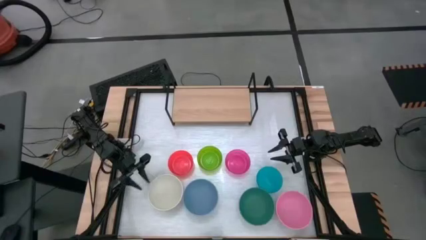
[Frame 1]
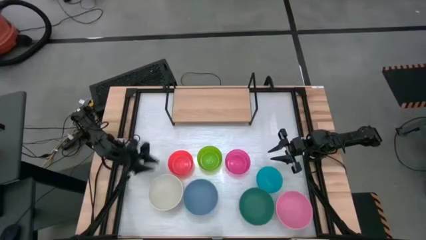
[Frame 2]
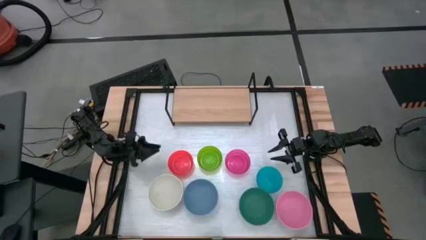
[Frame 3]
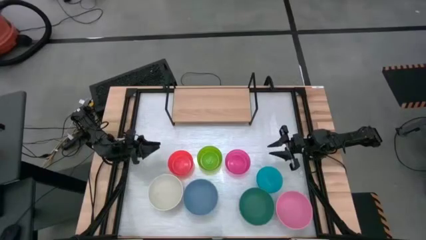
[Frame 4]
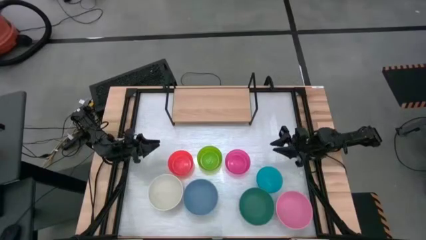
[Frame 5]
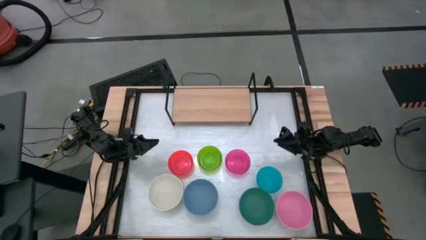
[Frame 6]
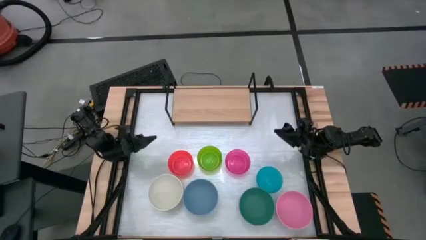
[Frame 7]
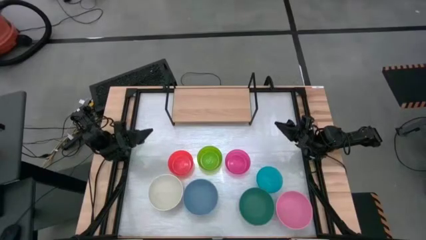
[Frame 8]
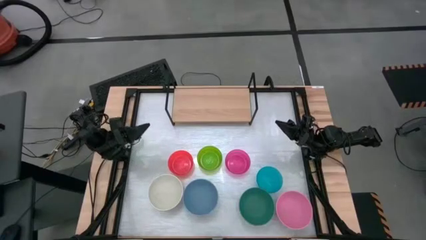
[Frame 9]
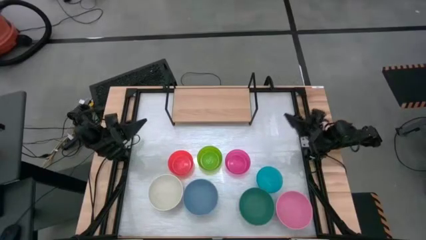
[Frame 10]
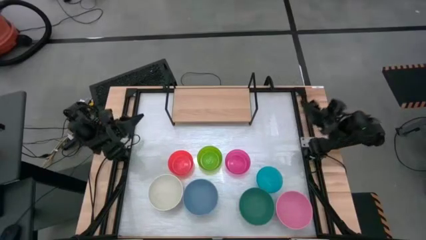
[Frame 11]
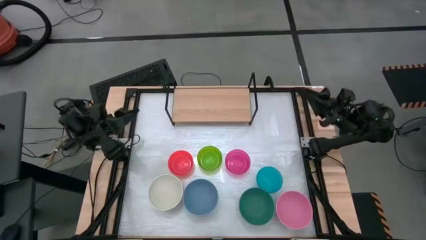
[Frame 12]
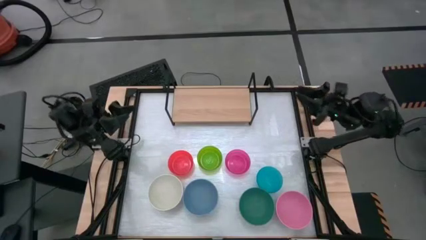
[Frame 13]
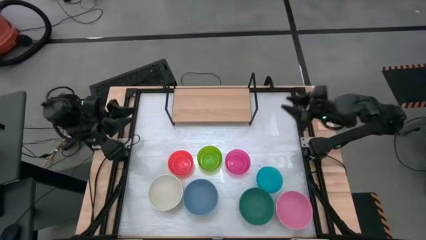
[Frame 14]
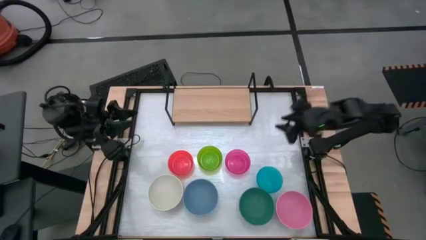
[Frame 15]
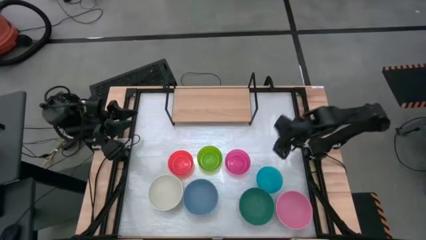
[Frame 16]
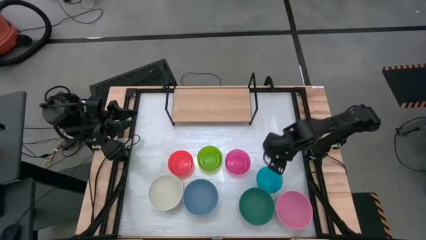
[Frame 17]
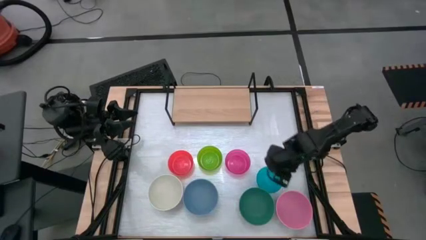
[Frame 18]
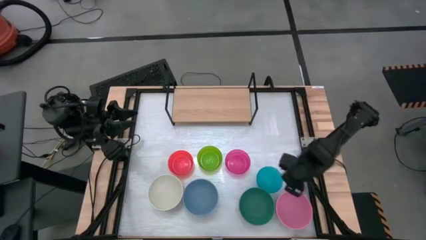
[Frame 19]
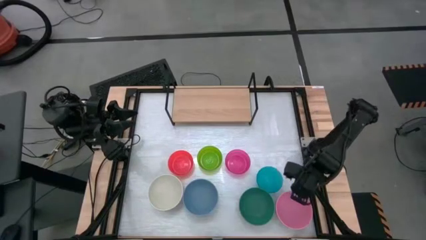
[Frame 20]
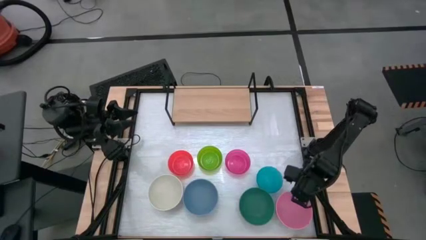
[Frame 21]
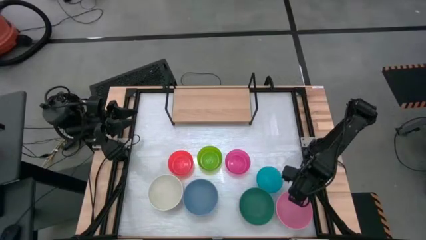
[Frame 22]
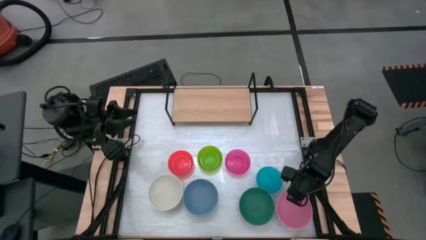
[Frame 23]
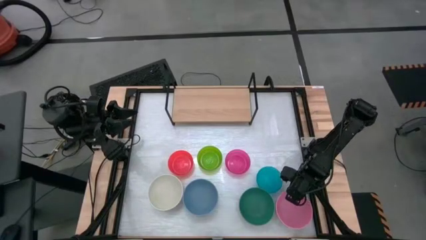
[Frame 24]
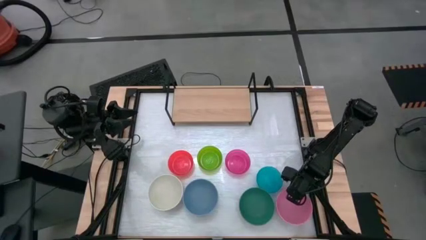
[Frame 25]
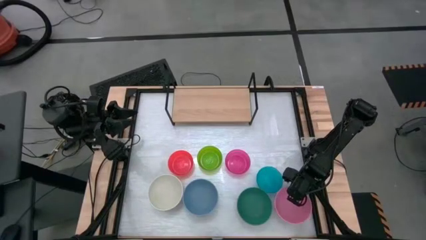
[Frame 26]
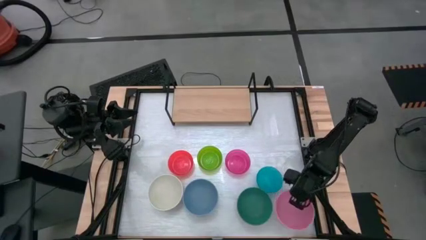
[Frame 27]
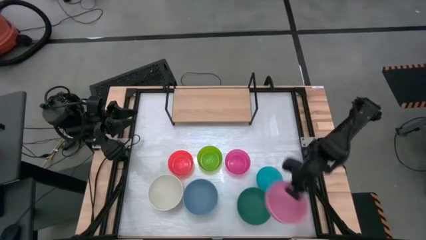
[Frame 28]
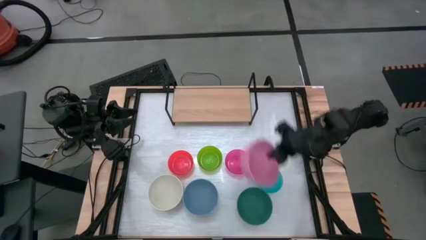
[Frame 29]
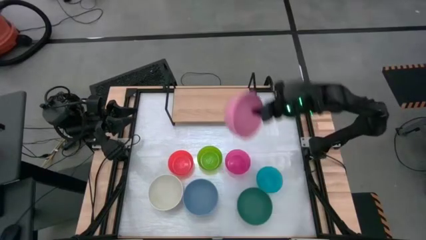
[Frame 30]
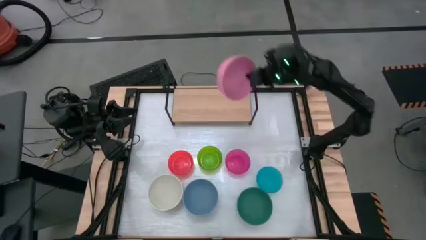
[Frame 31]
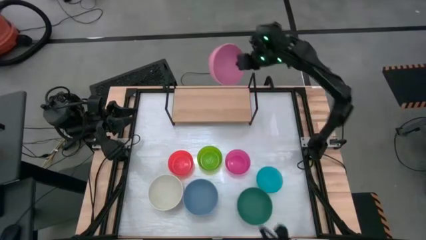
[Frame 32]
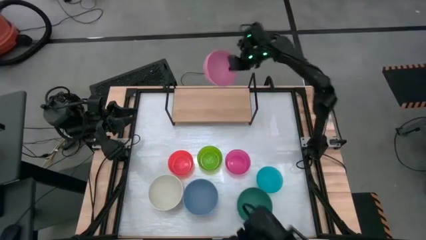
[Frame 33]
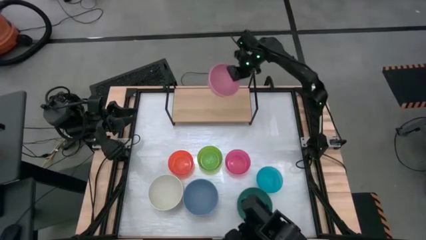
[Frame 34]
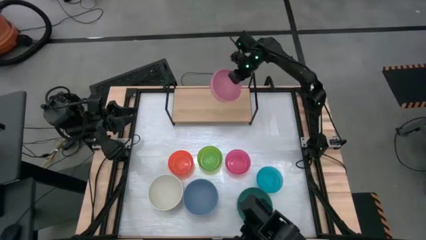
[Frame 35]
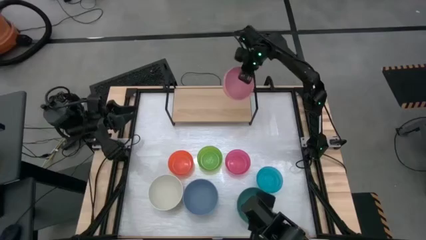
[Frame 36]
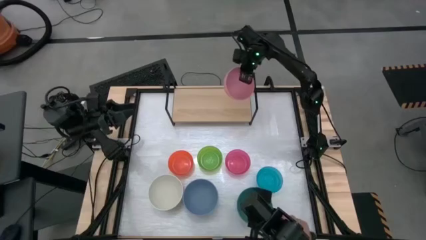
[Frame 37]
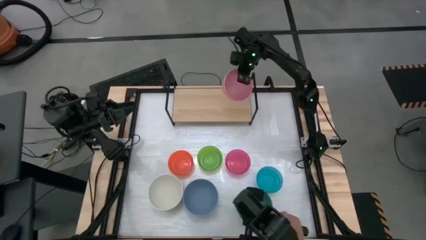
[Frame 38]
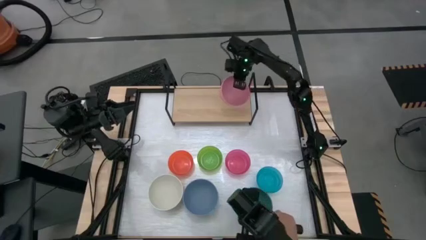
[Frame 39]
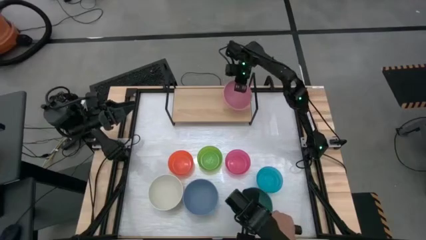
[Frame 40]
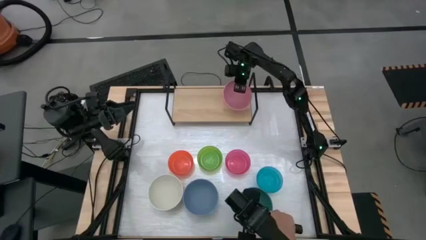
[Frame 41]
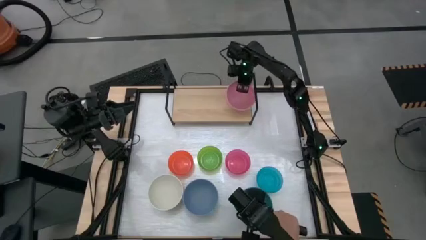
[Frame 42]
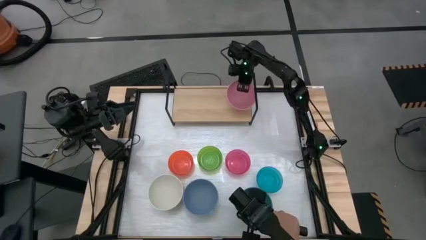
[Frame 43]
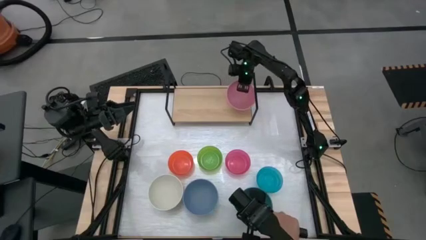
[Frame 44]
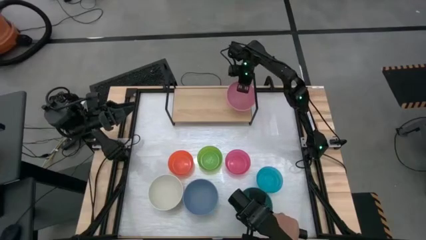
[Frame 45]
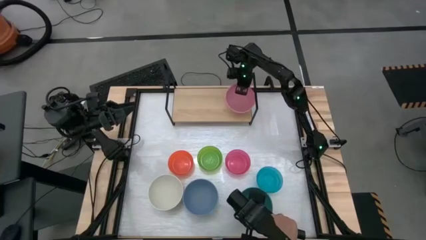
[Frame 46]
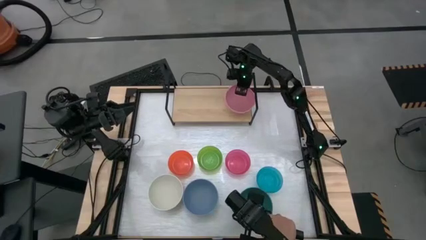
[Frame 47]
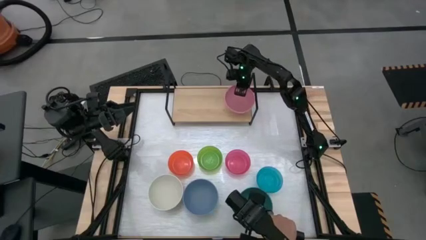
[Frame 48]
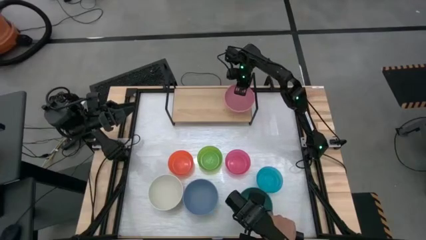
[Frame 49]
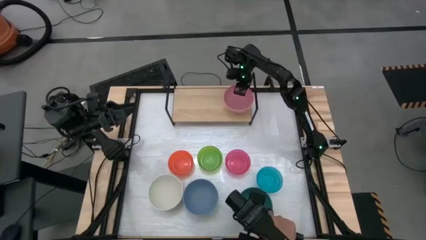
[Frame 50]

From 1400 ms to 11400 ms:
Task: Place and stack bowls onto a shelf
Put the pink bowl on the shelf
